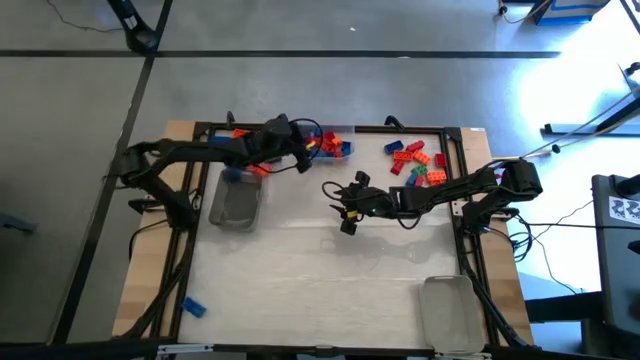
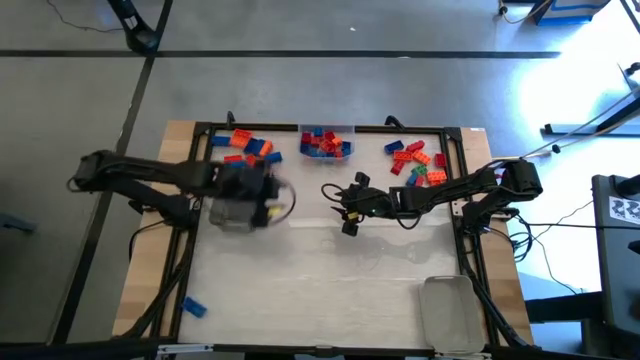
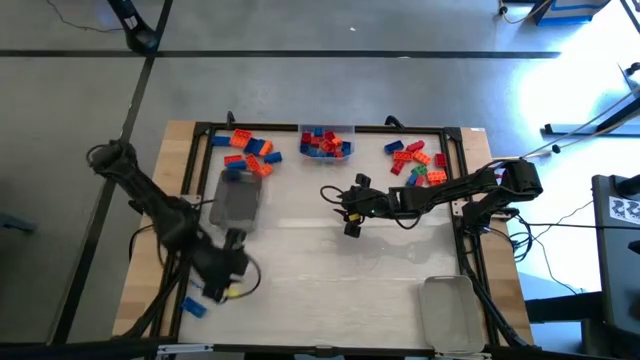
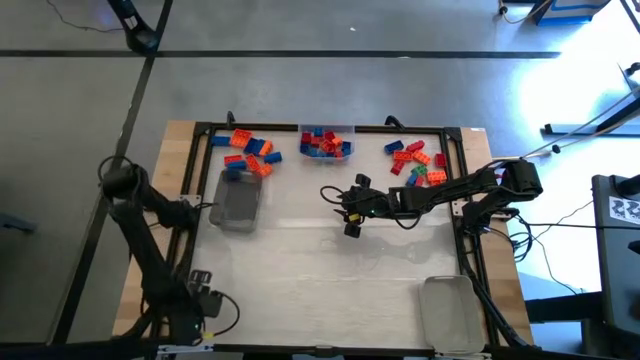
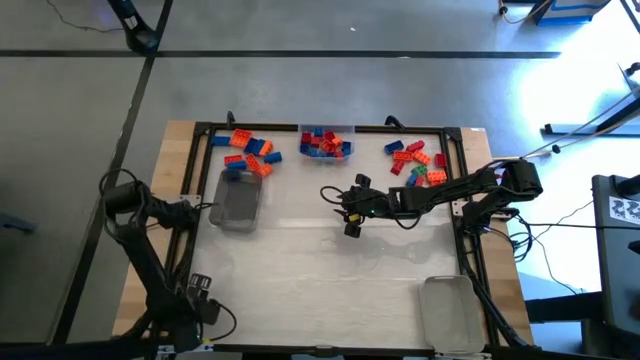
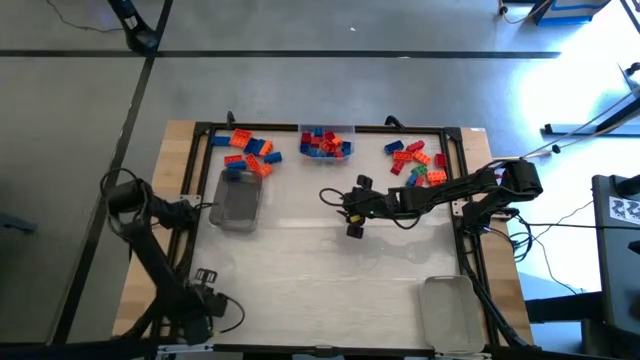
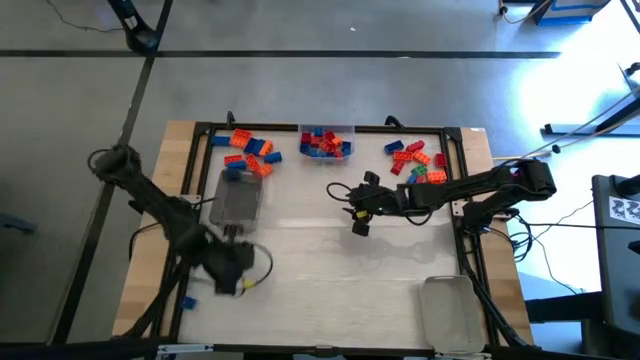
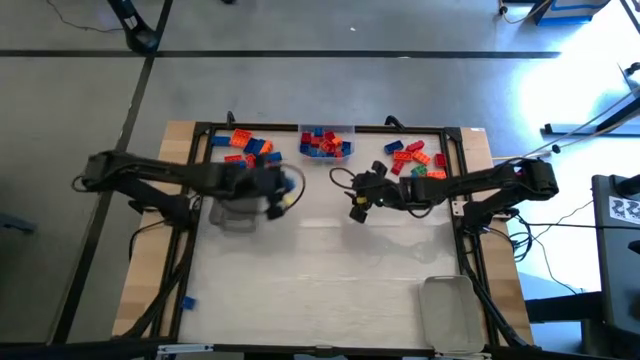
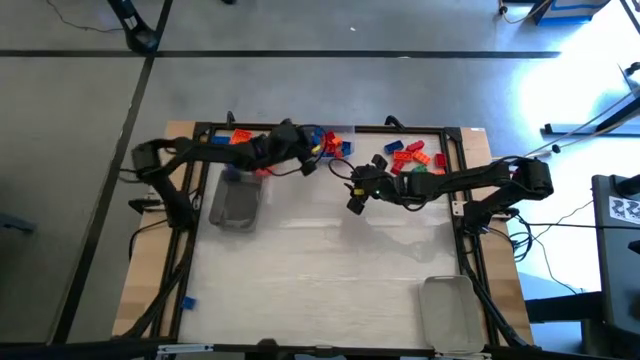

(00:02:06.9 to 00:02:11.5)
Task: Sort blocks by size
Put the blue 4 stud game piece into the transparent bin

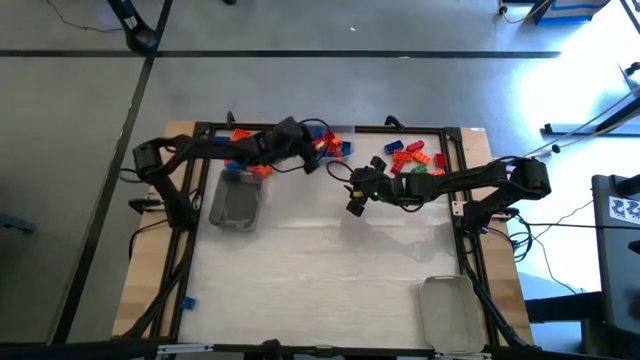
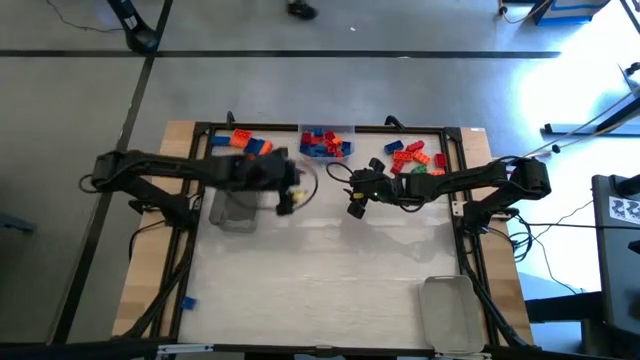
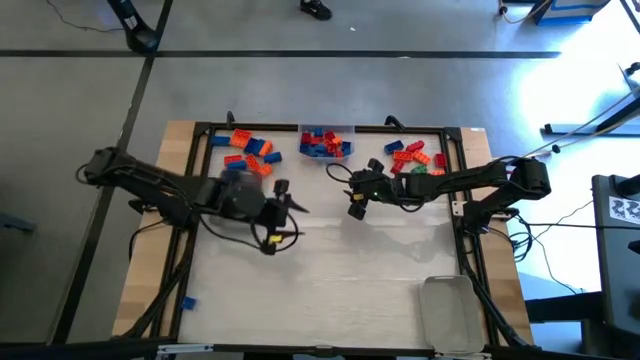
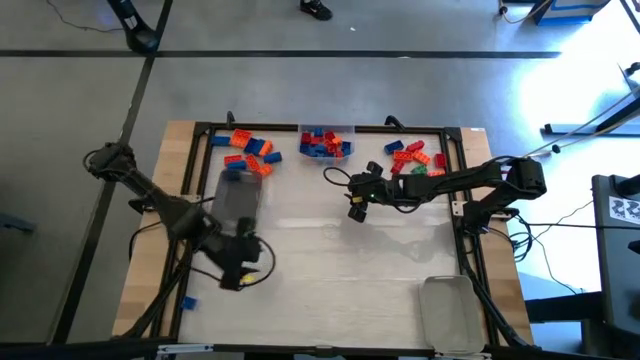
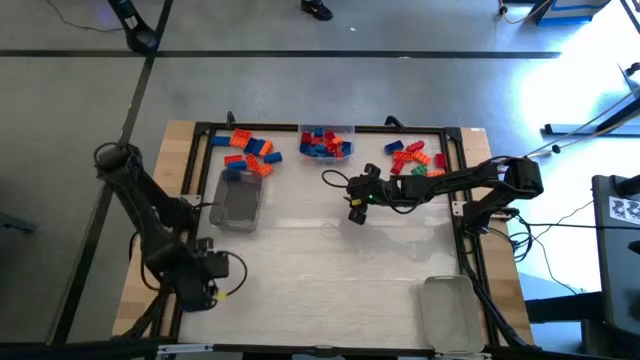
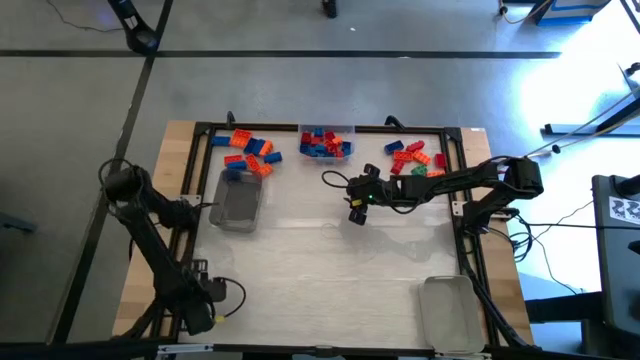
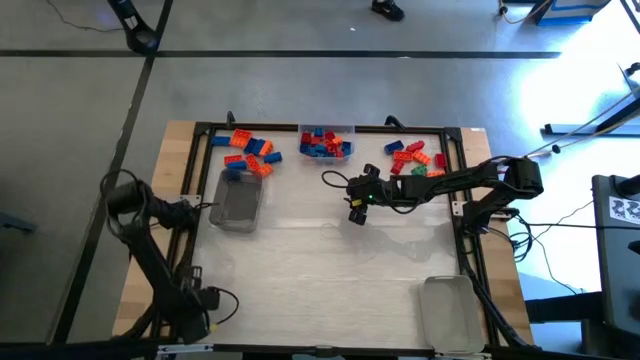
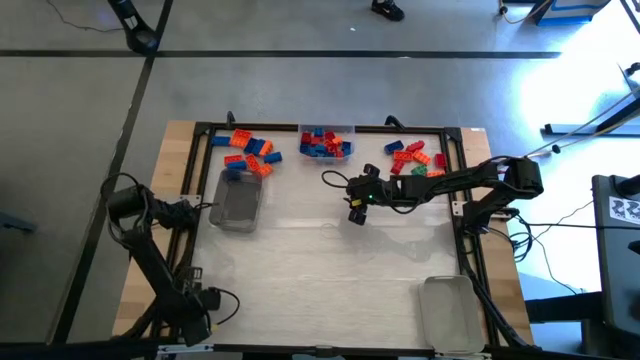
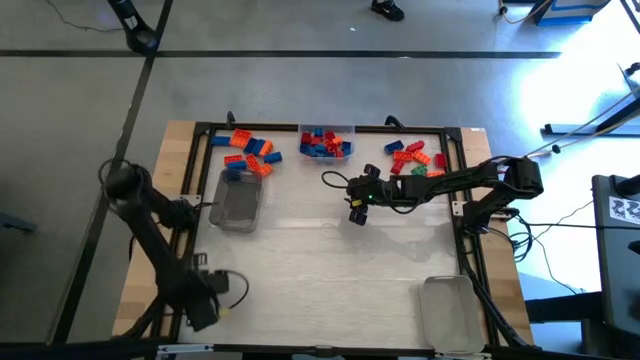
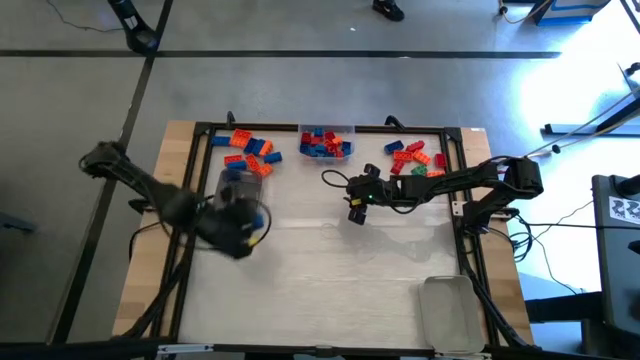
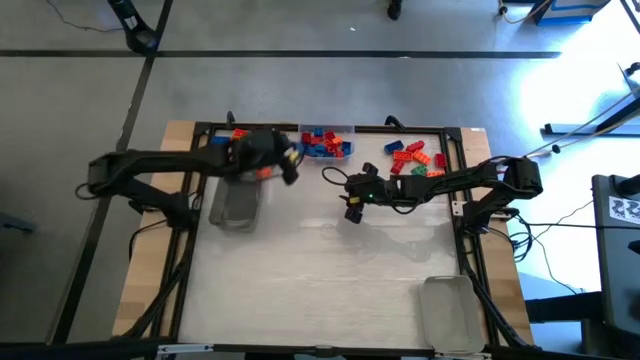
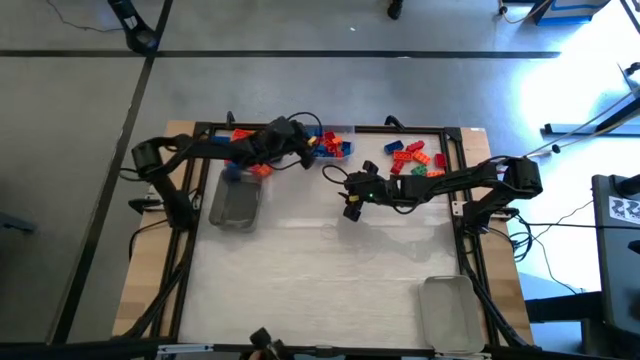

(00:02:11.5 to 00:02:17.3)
Put the blue 4 stud game piece into the transparent bin

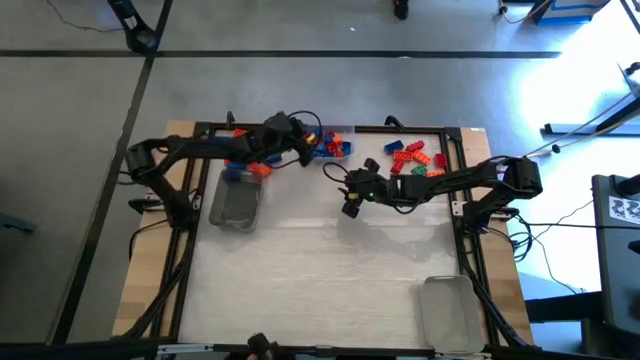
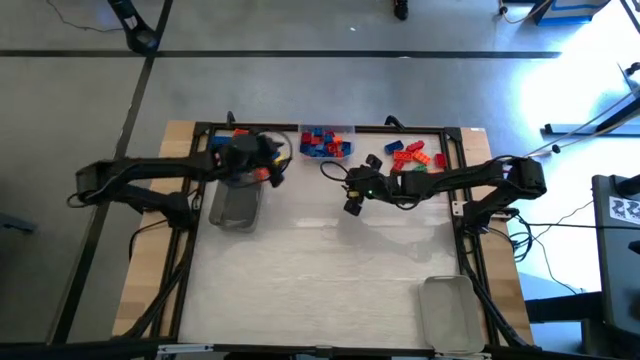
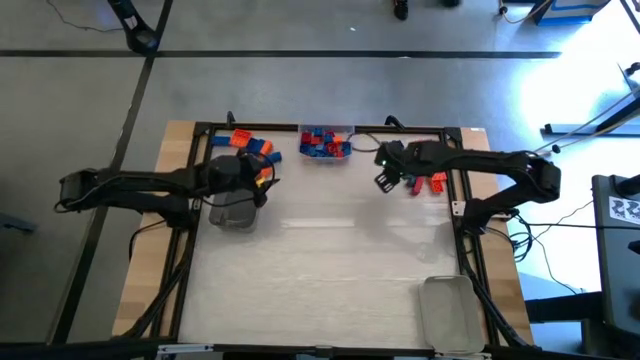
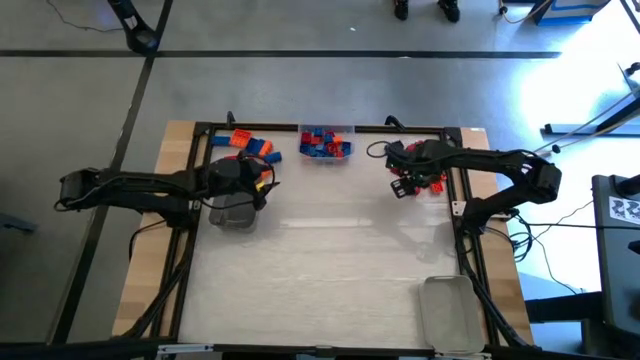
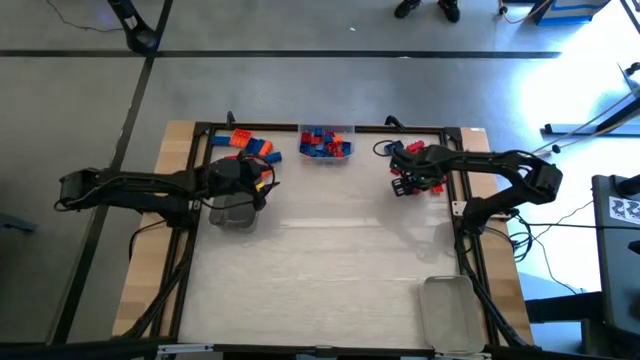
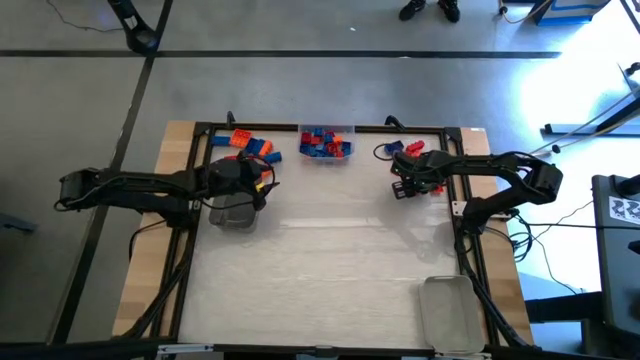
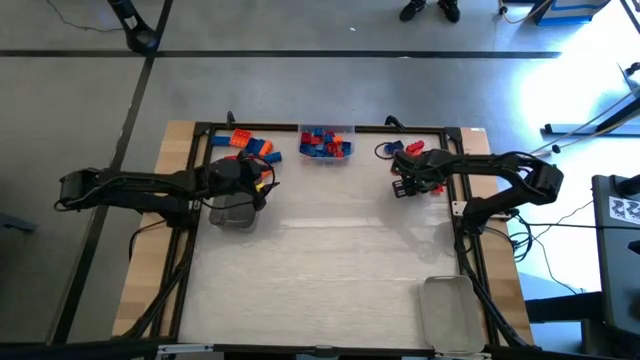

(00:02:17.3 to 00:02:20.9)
Put the red 8 stud game piece into the gray bin

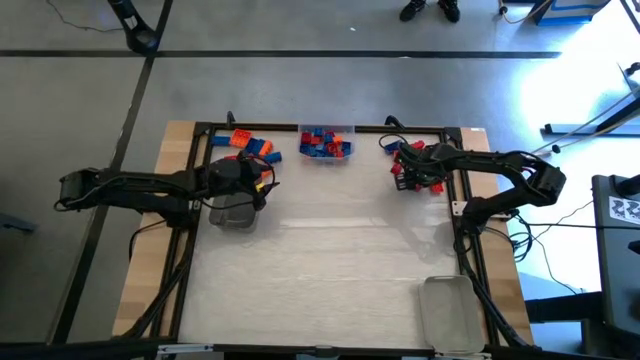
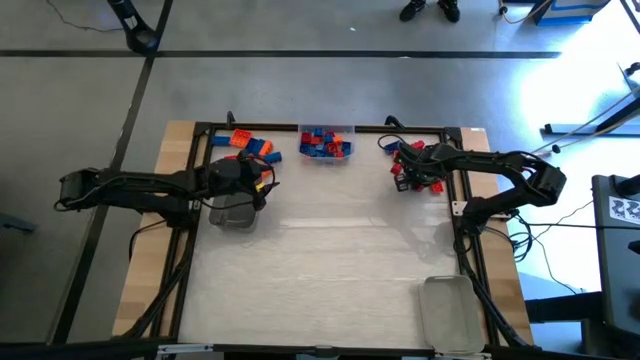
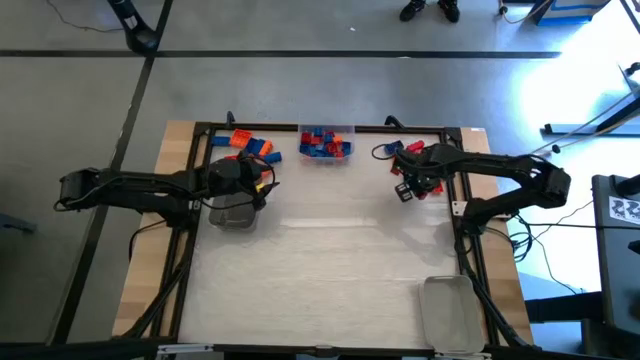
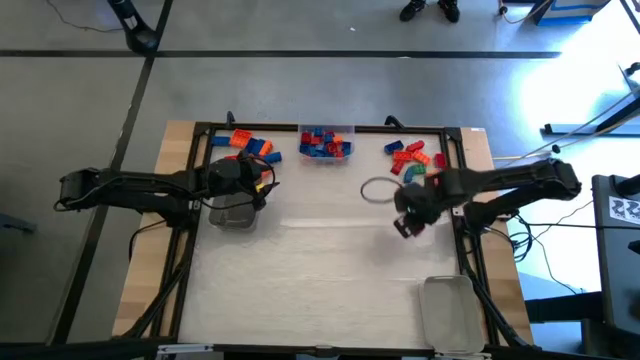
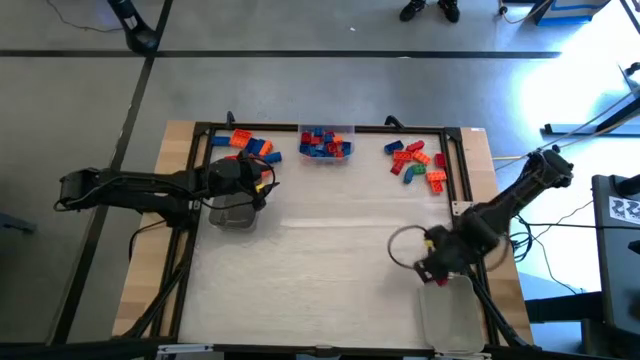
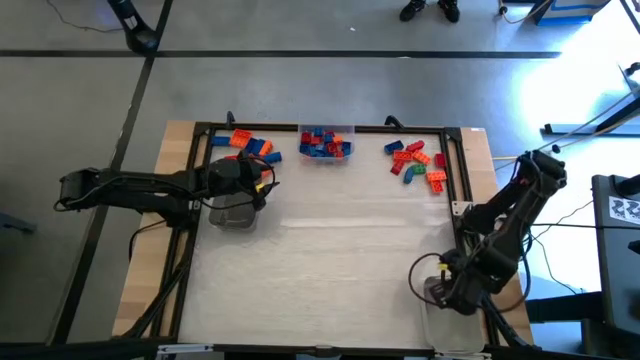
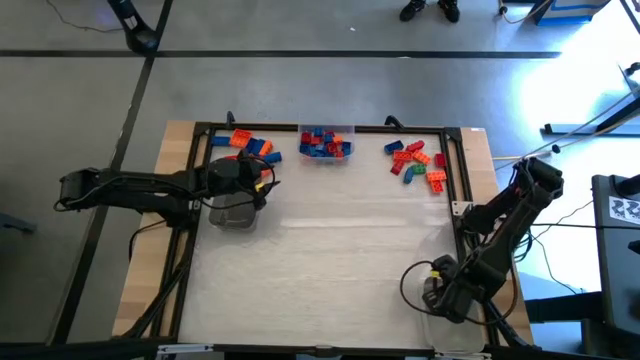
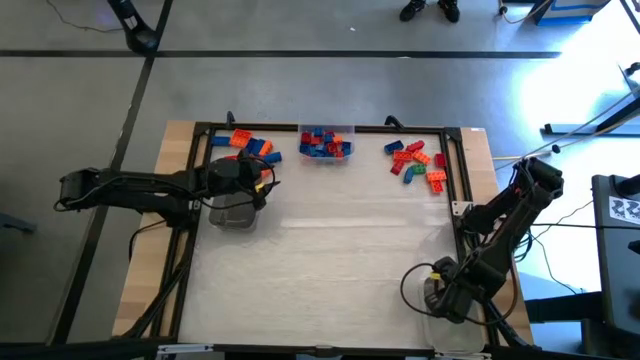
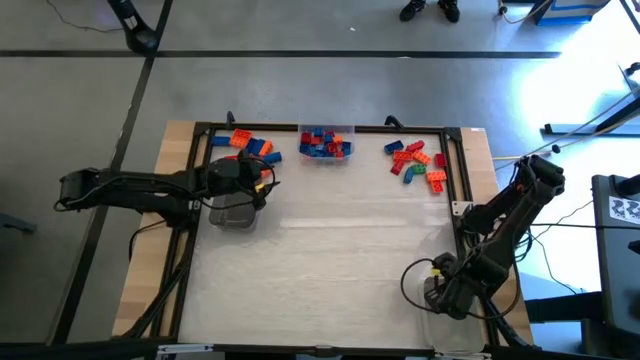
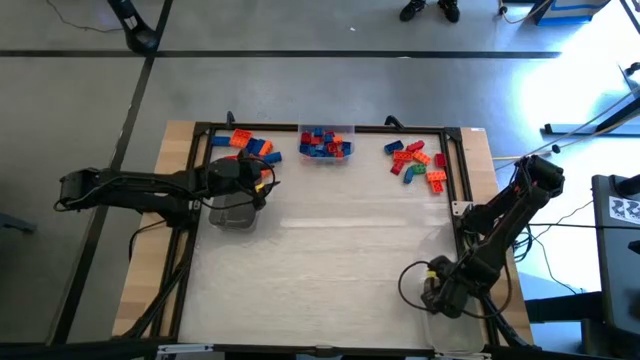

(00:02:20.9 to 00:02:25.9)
Put the red 8 stud game piece into the gray bin

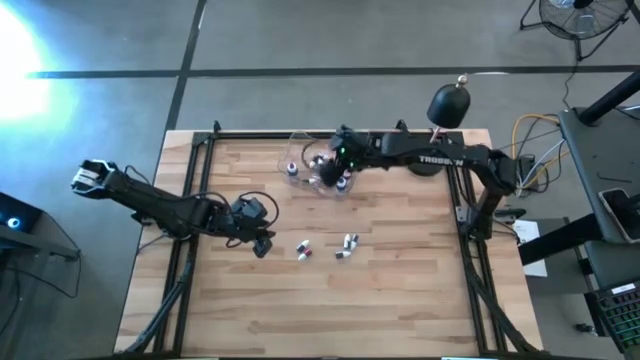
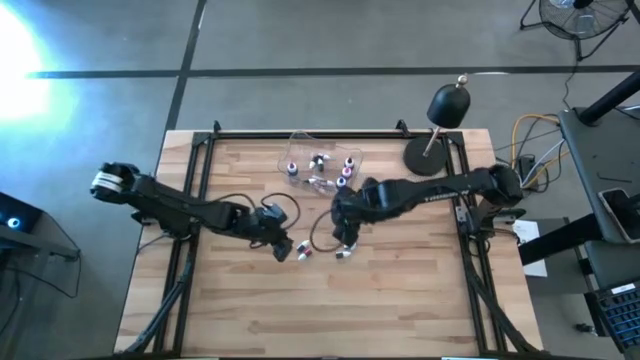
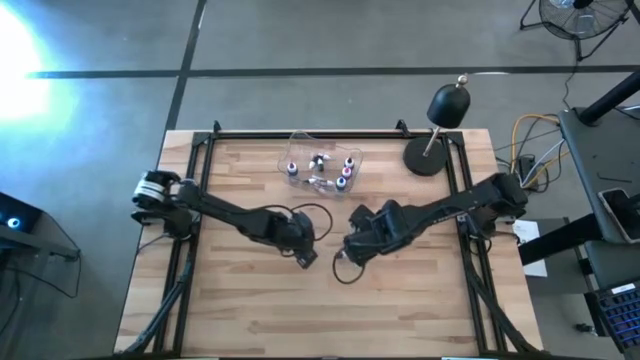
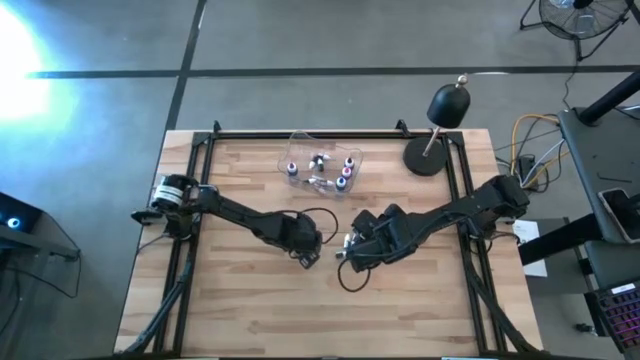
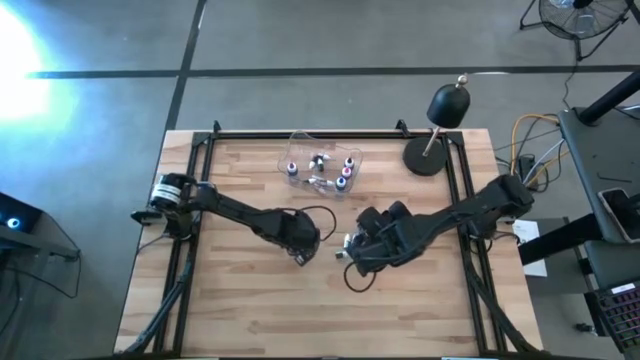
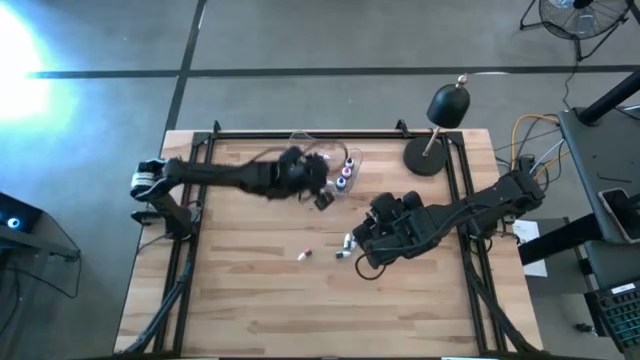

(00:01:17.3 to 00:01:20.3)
Task: Pick & Place food coloring
Put the left small blue food coloring bottle into the transparent bin
